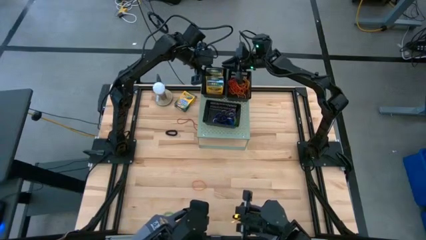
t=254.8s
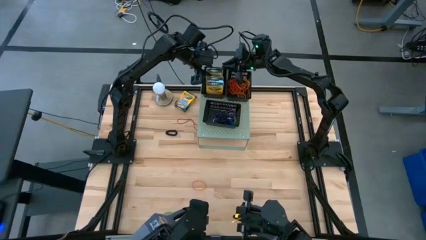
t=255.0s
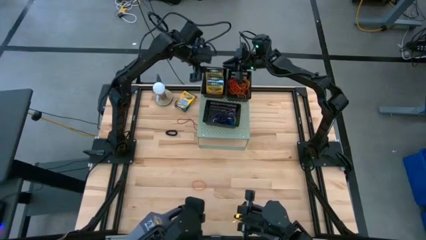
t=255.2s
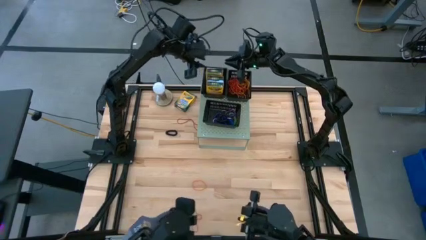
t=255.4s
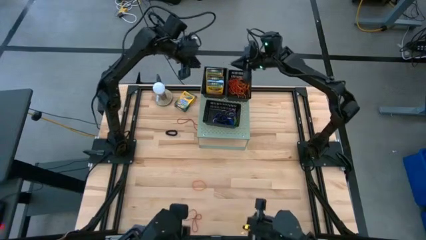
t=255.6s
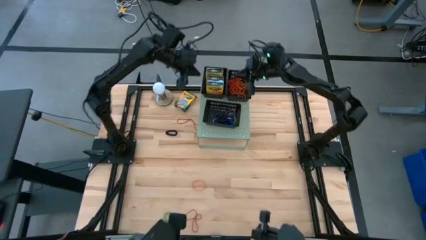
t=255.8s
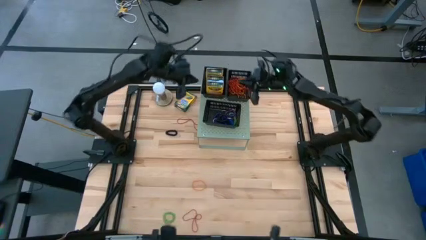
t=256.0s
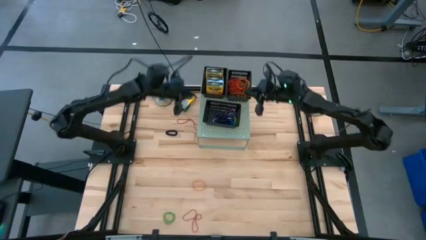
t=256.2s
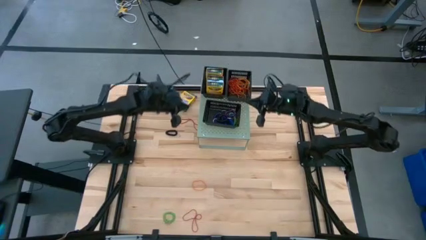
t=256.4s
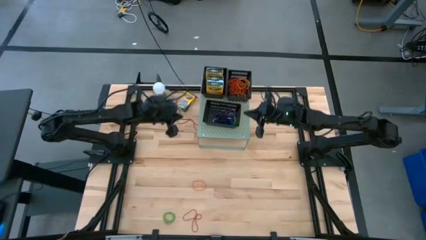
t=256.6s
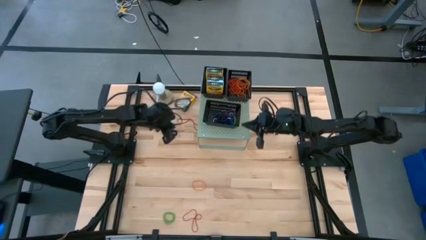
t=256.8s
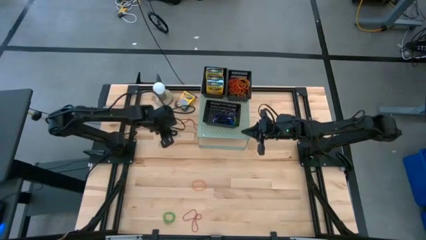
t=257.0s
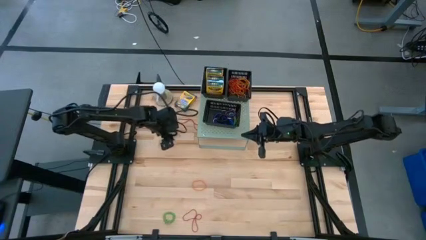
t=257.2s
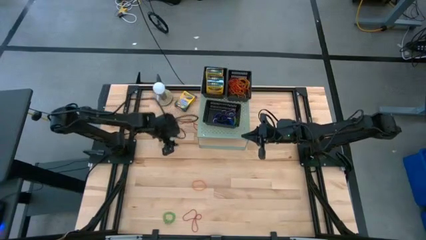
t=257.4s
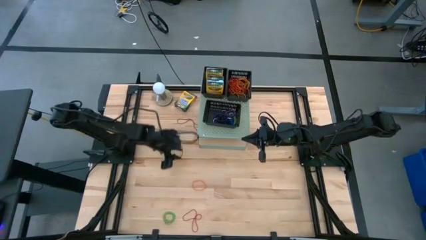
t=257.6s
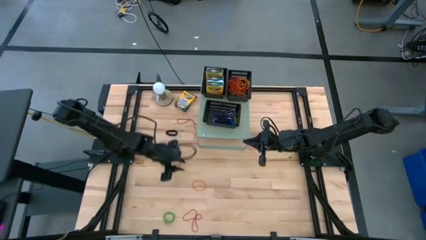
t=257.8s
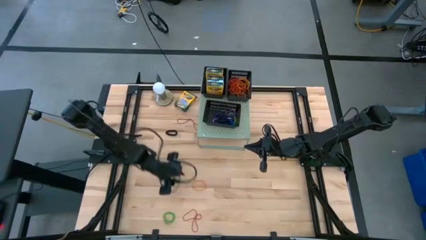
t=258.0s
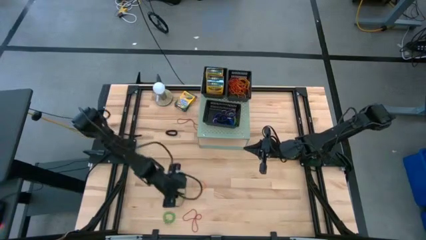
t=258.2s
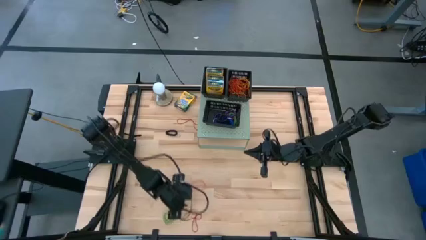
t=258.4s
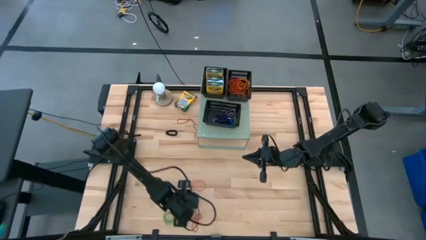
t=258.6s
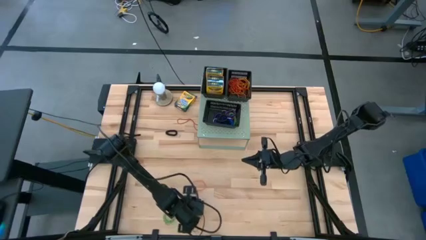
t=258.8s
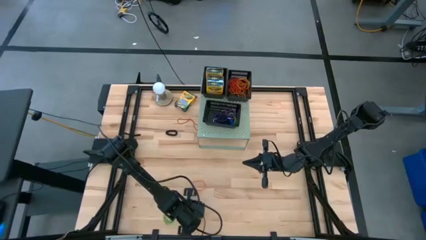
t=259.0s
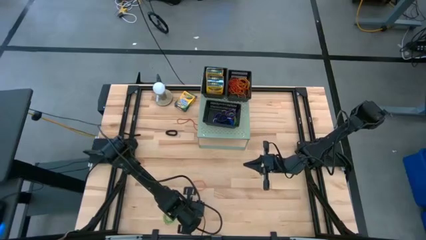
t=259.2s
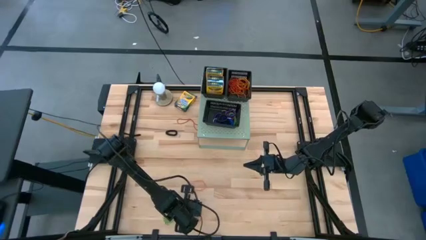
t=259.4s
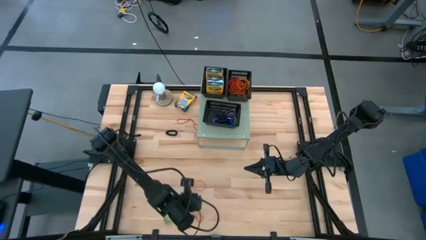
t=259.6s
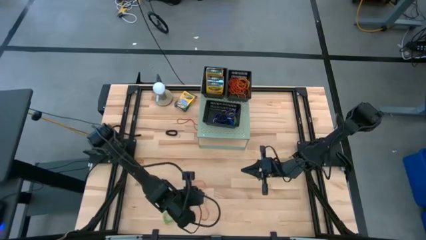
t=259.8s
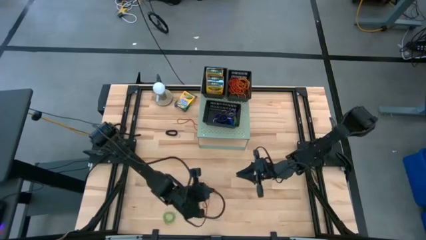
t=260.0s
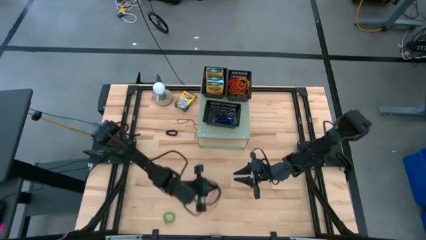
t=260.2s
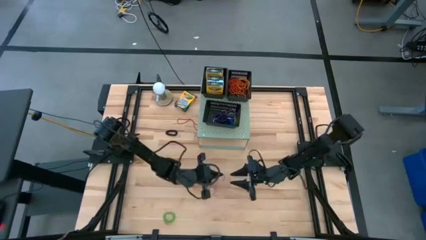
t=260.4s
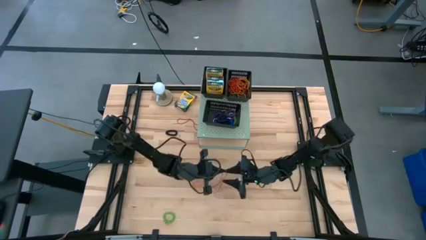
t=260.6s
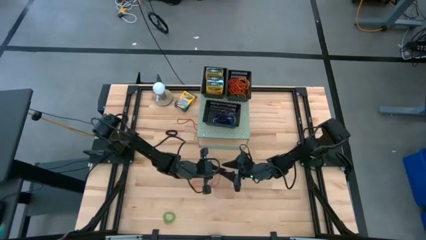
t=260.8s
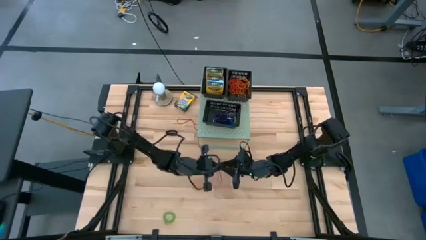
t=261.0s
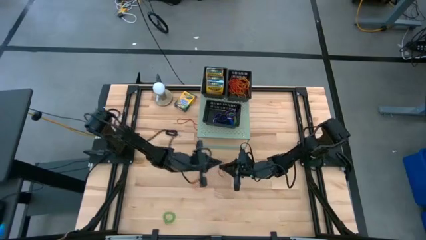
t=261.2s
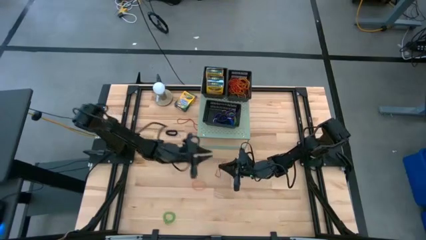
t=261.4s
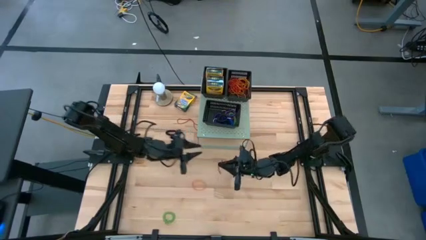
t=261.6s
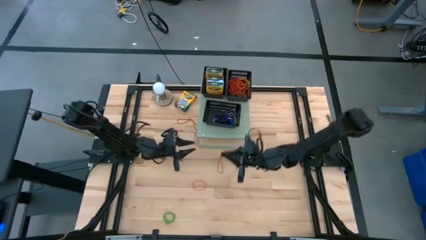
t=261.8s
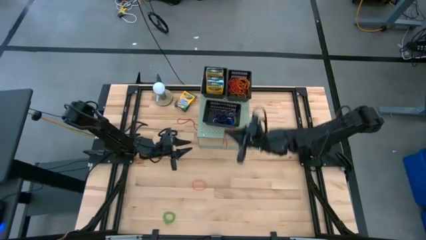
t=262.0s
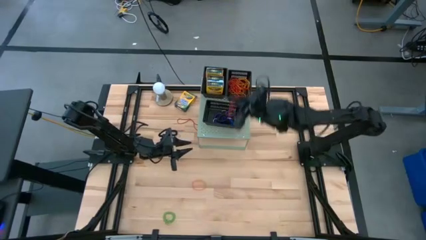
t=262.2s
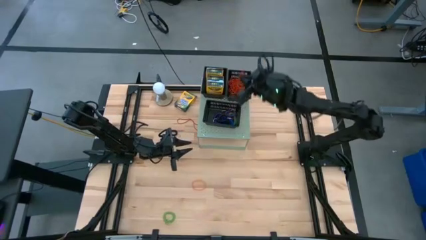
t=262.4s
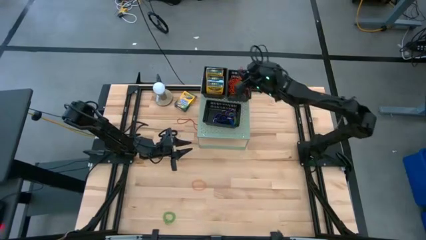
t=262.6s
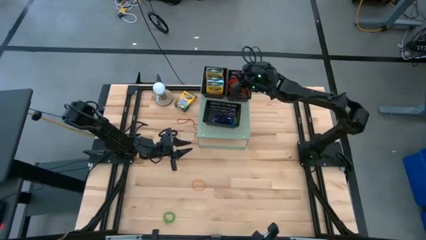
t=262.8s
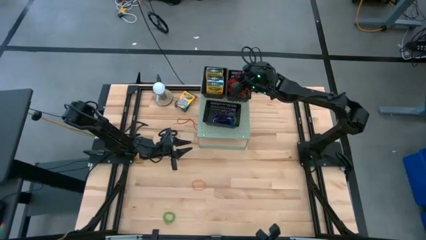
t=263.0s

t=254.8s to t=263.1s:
Task: Pick & Place Office Desk Supplies
Put the red rubber band into the top right black bin on the shelf

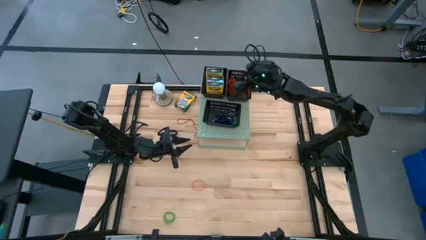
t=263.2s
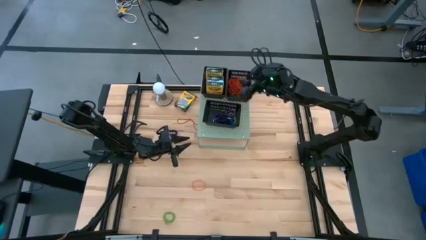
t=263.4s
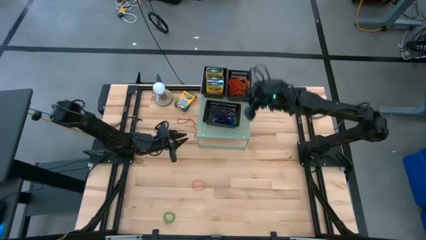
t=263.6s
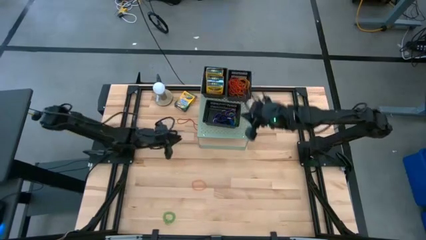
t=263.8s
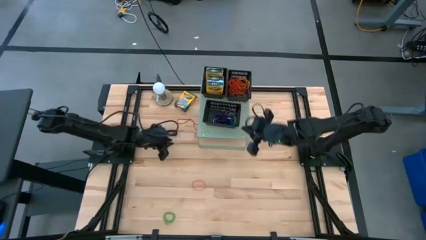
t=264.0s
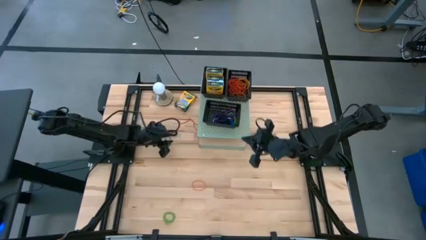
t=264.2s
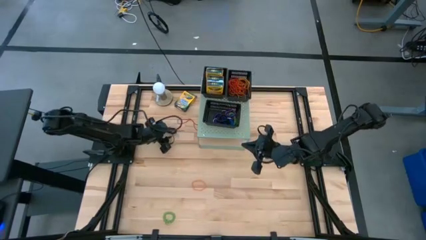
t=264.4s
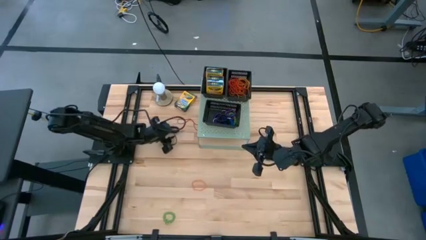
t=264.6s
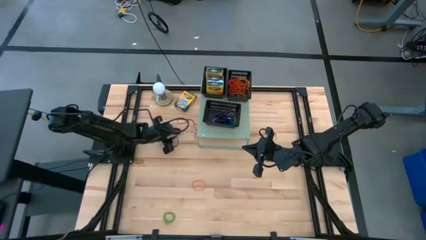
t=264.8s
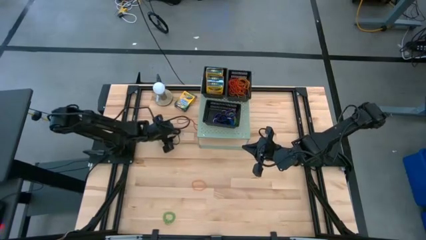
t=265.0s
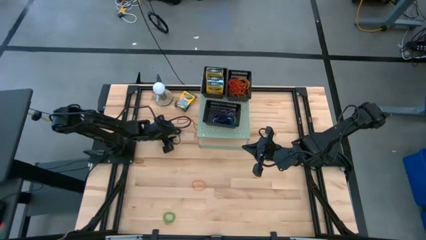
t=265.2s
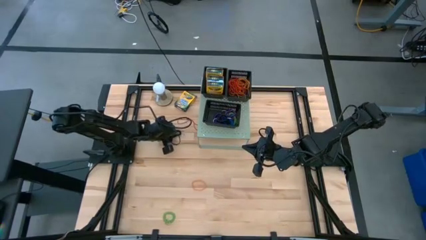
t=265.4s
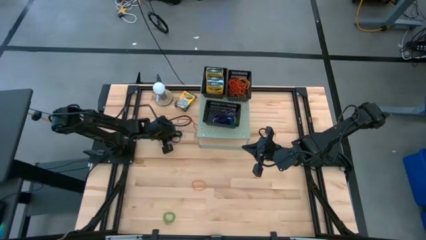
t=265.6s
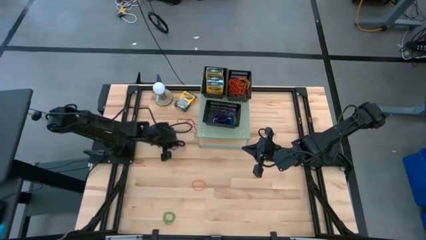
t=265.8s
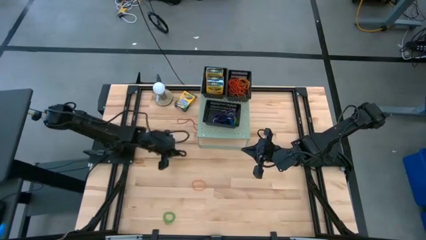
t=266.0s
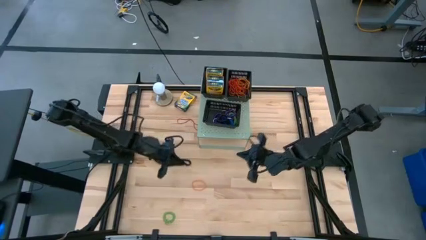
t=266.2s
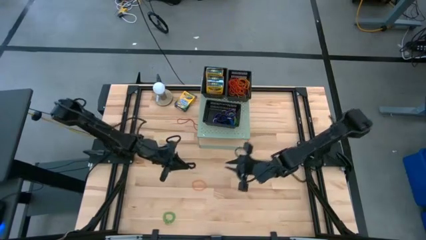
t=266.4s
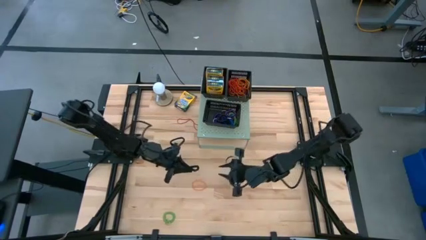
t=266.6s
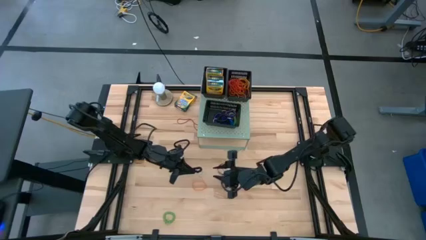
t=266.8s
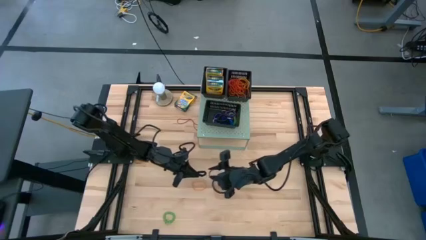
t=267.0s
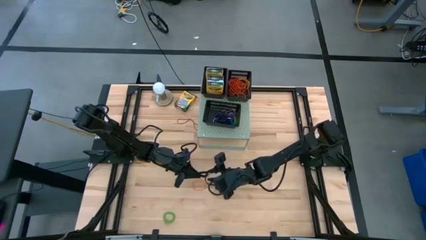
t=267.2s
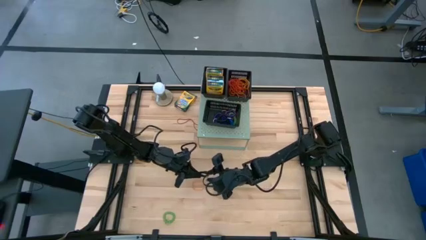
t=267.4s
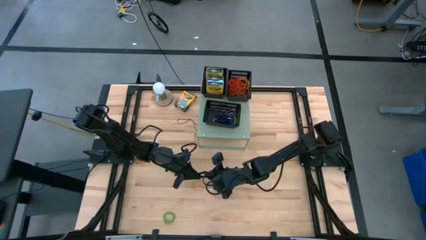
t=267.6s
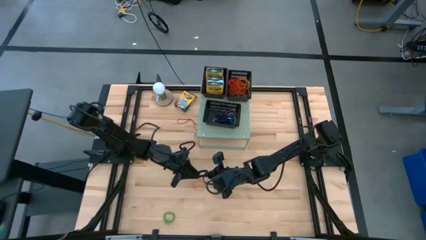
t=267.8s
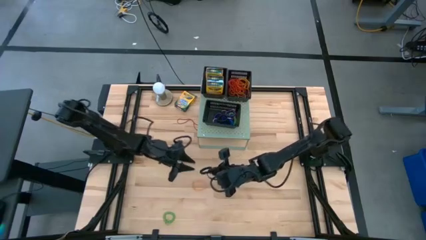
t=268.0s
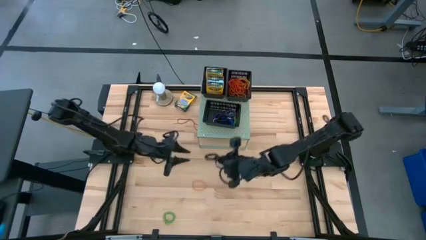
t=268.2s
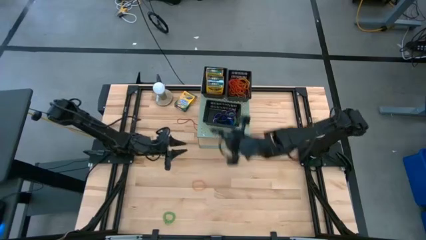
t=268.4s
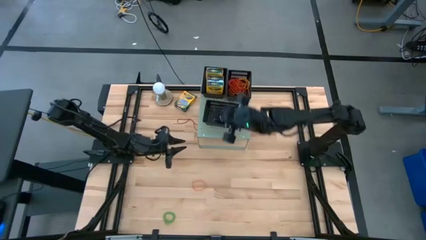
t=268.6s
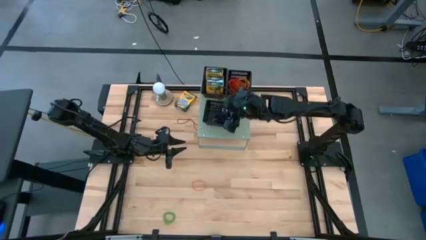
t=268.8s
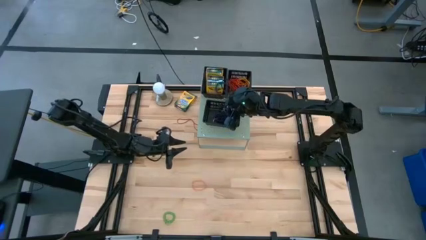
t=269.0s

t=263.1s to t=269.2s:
Put the black spring keychain into the bottom black bin on the shelf
